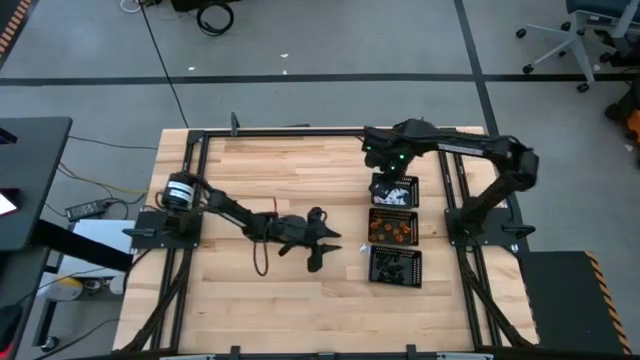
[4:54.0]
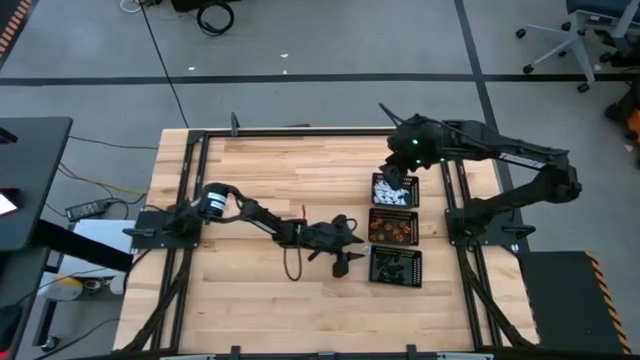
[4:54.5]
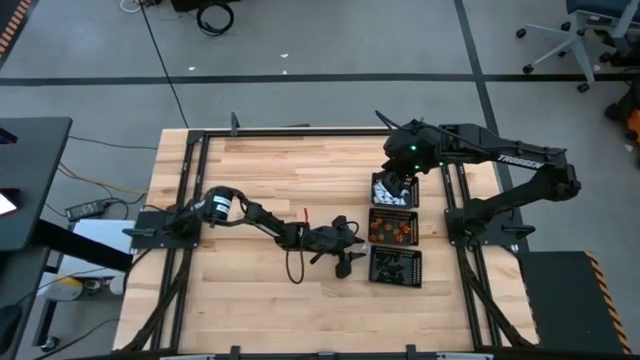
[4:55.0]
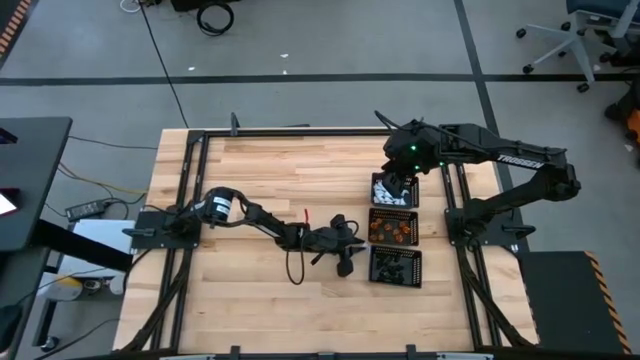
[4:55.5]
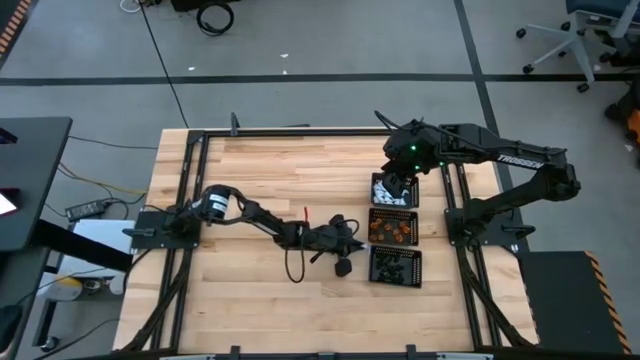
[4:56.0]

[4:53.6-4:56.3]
Task: Sort Halloween decoration
Put the white ghost toy into the top black bin

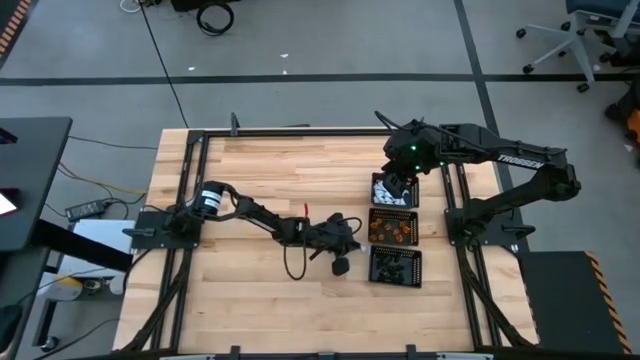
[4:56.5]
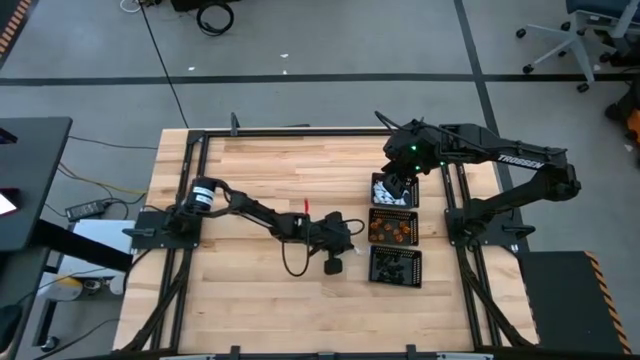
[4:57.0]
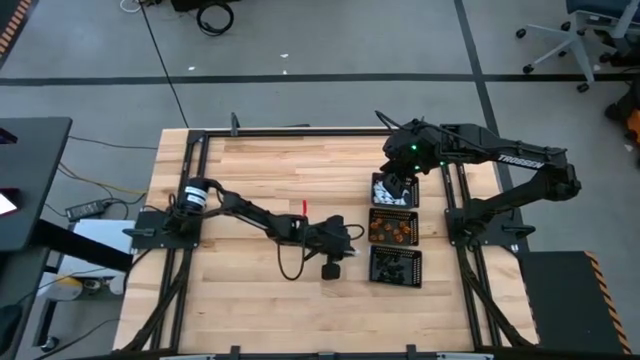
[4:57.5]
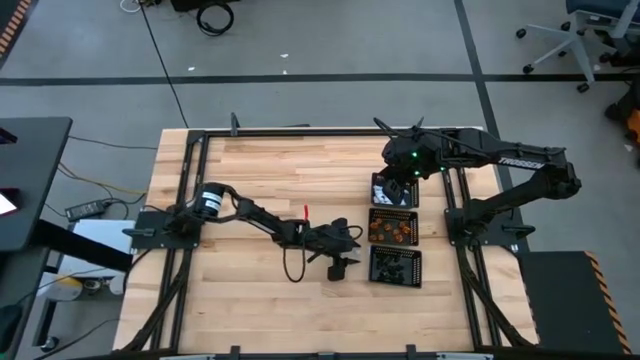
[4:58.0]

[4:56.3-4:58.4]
Put the white ghost toy into the top black bin

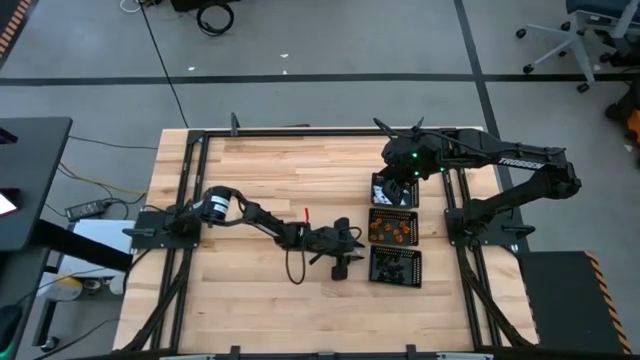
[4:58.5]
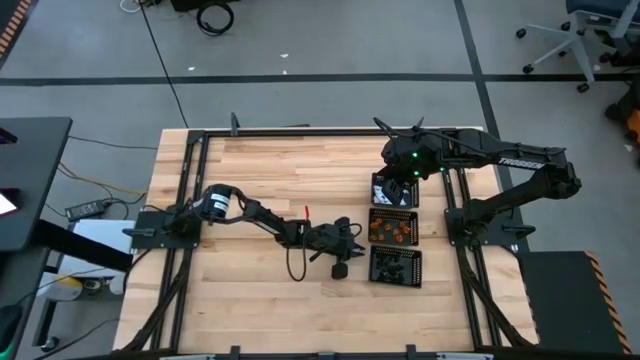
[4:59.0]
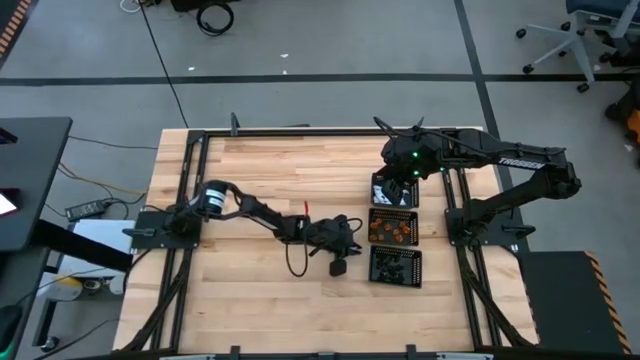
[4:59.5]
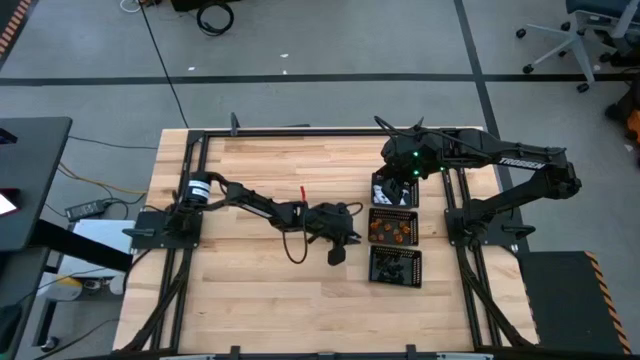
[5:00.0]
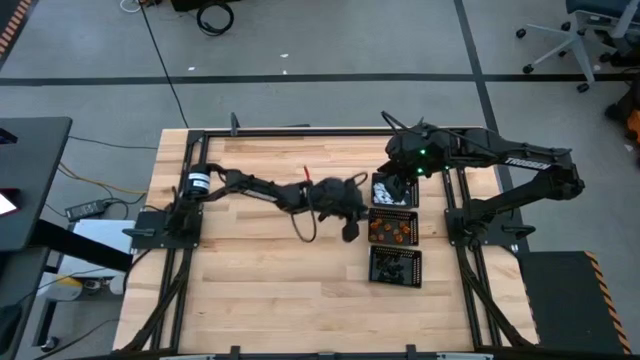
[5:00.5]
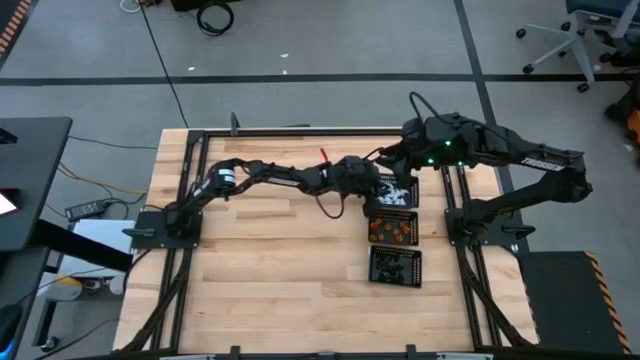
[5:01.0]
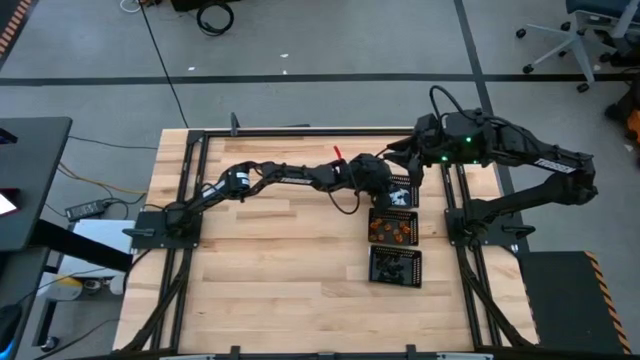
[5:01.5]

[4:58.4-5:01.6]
Put the white ghost toy into the top black bin

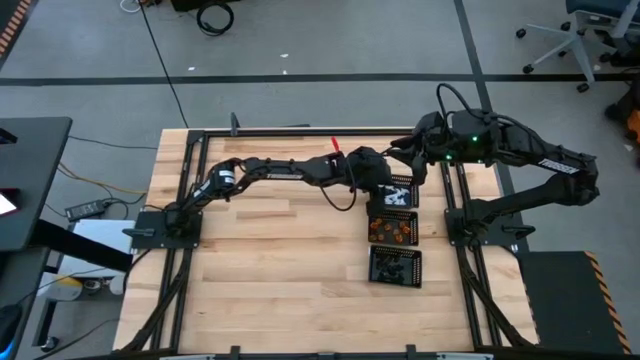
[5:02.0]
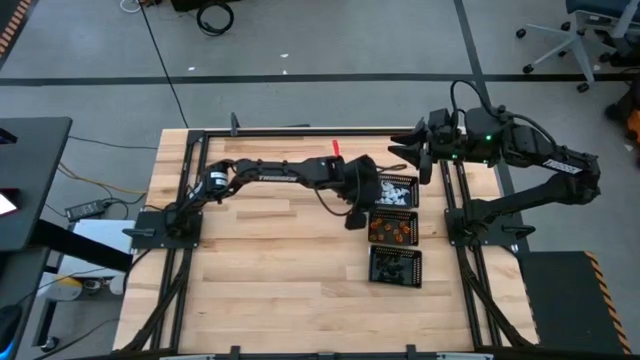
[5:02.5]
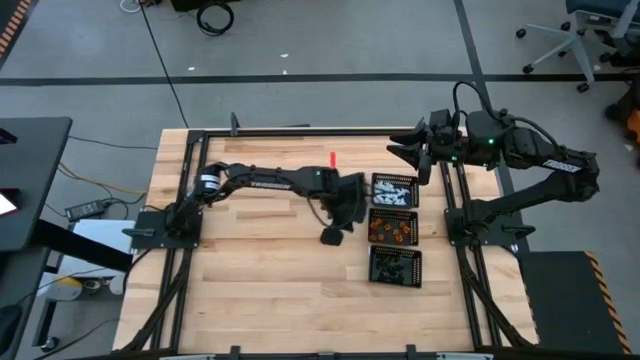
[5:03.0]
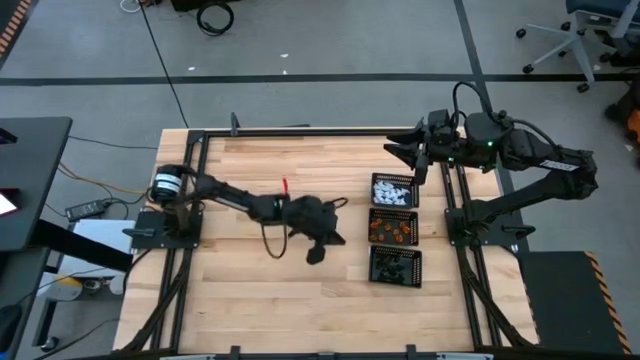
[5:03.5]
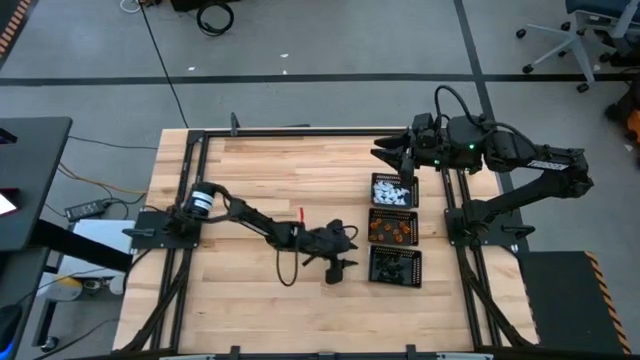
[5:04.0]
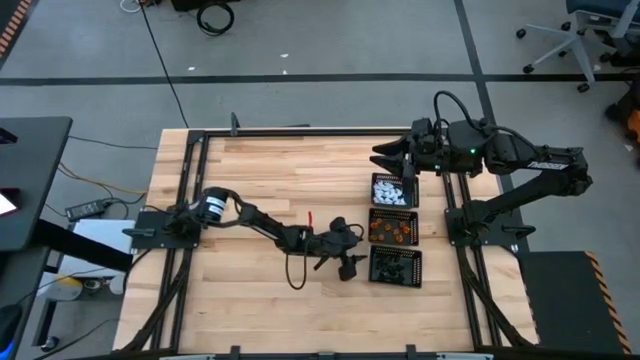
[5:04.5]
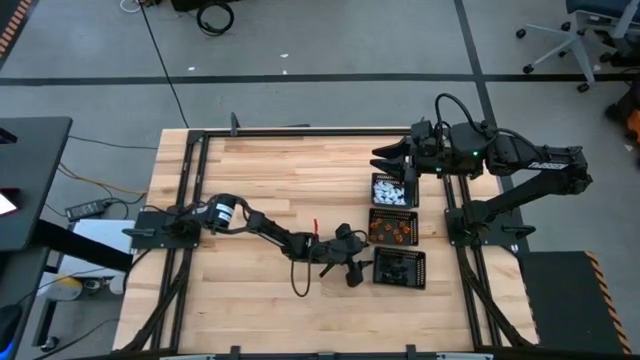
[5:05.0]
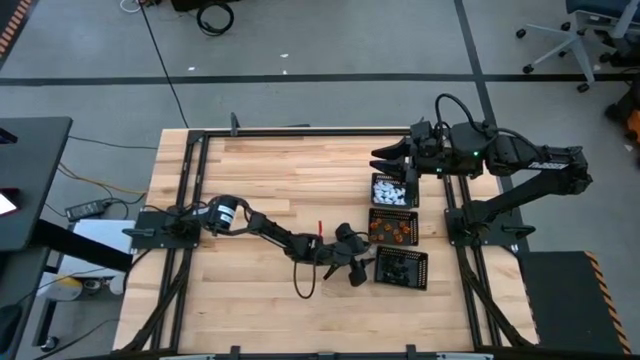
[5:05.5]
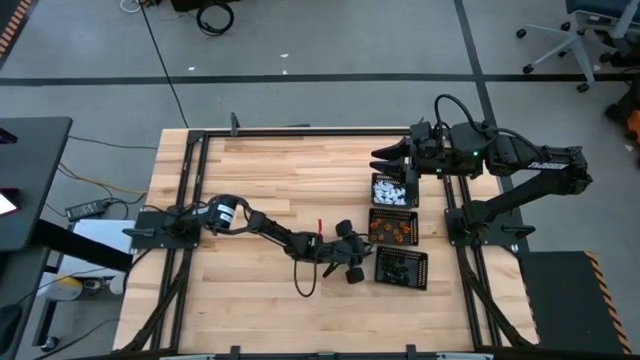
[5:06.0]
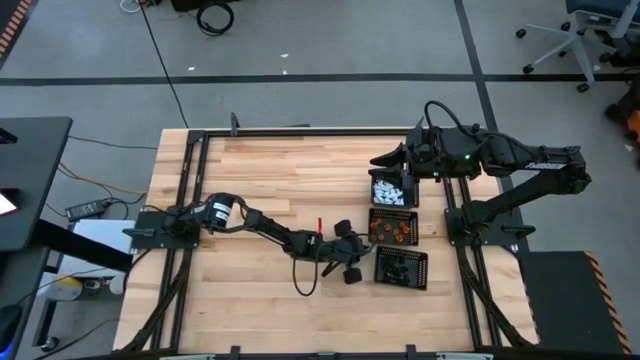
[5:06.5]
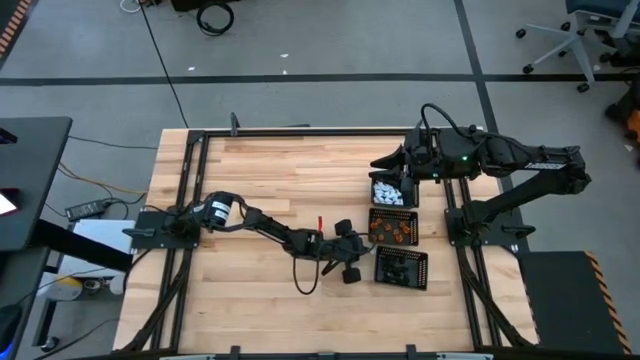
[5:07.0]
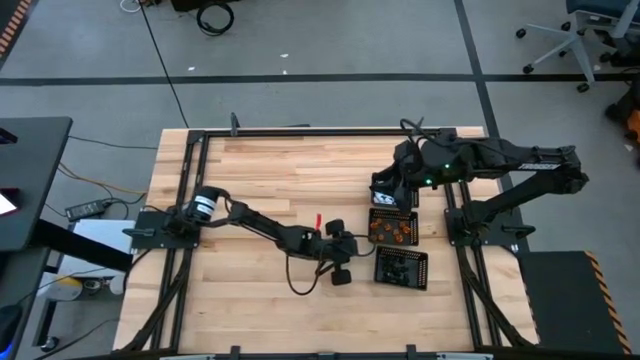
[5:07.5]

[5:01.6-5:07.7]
Put the white ghost toy into the top black bin

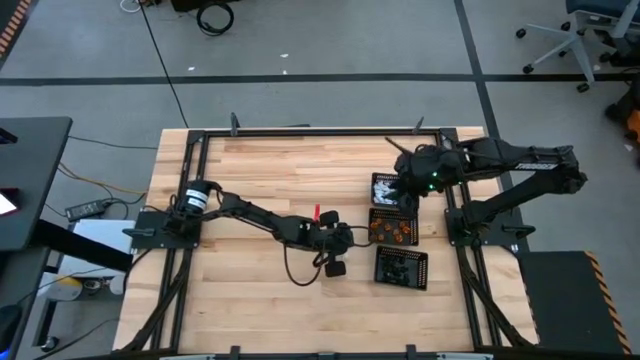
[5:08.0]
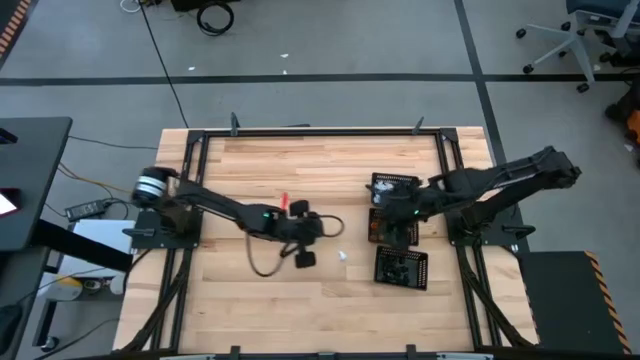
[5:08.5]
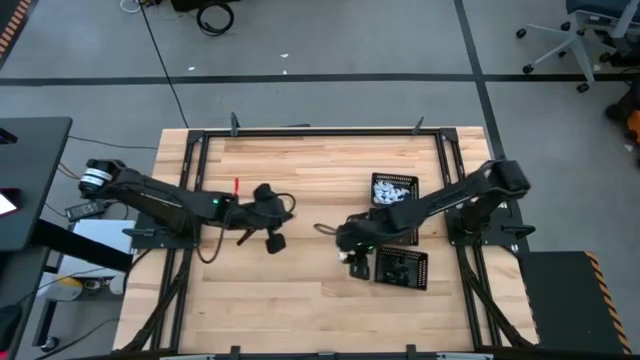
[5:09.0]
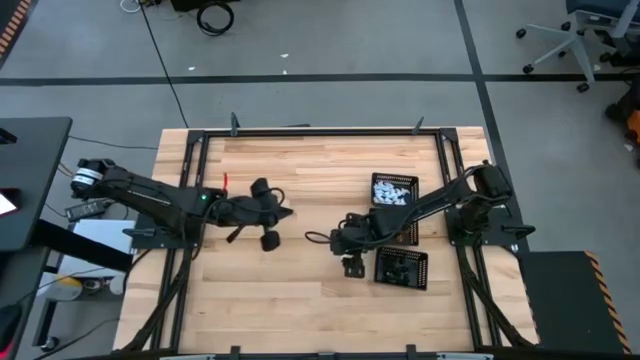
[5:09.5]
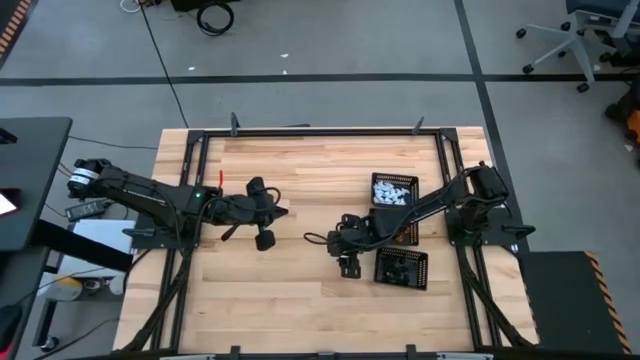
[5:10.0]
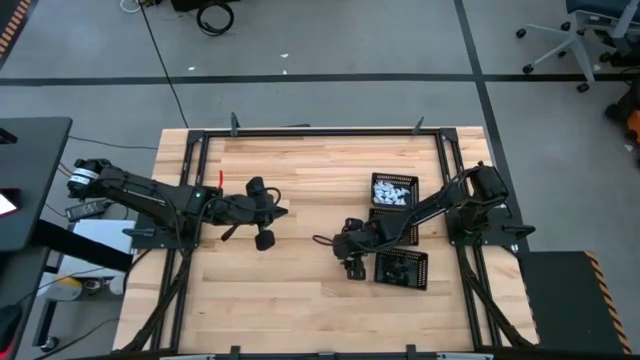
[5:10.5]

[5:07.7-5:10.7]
Put the white ghost toy into the top black bin

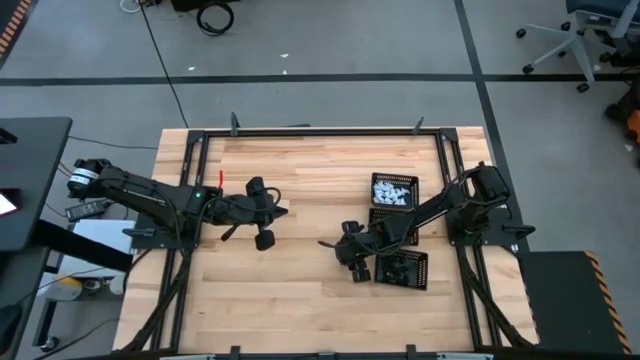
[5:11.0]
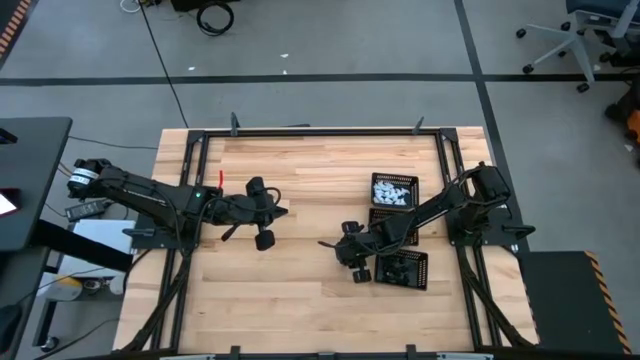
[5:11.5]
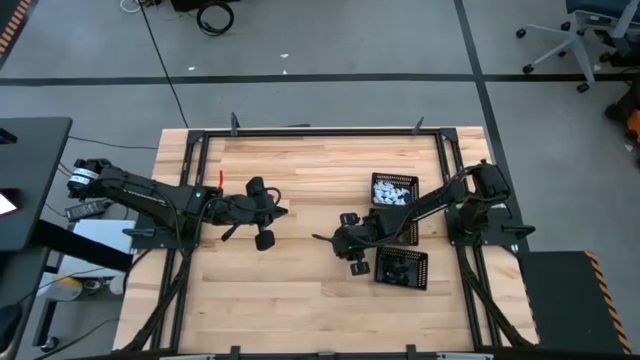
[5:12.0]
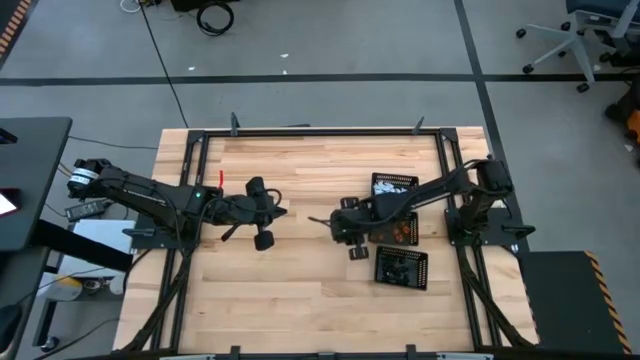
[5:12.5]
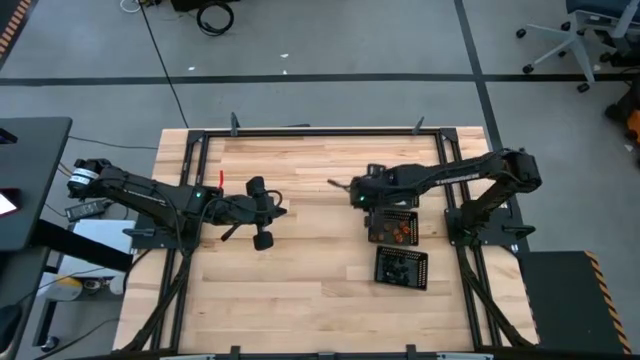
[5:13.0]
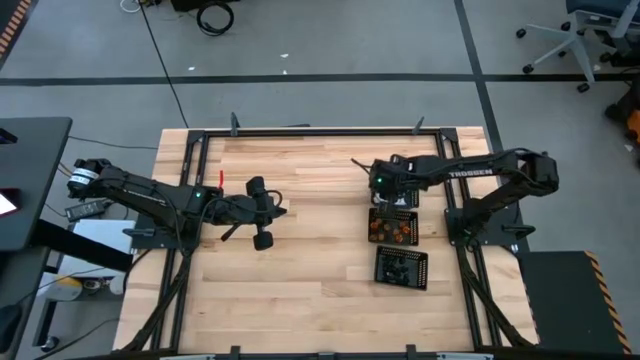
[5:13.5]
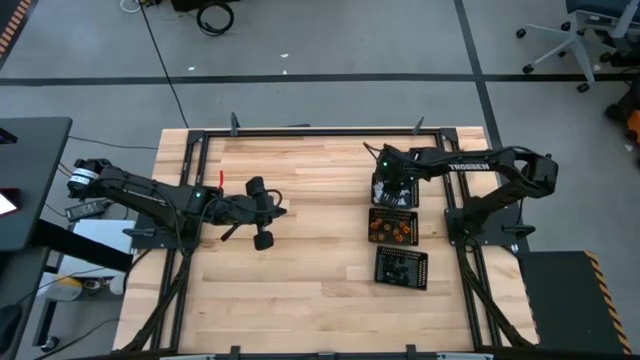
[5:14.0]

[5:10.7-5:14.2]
Put the white ghost toy into the top black bin
